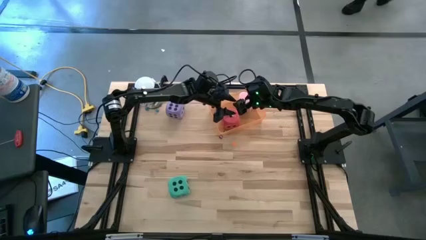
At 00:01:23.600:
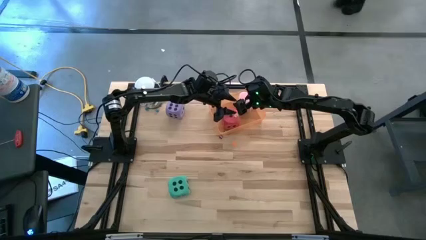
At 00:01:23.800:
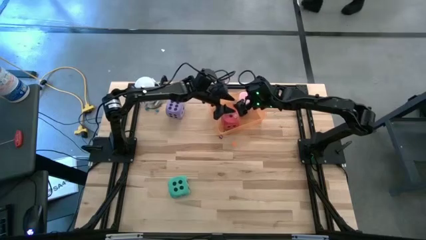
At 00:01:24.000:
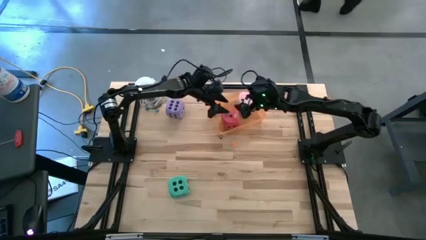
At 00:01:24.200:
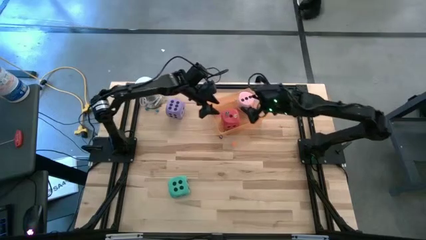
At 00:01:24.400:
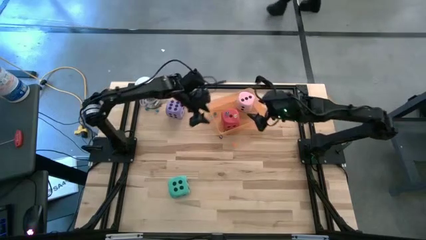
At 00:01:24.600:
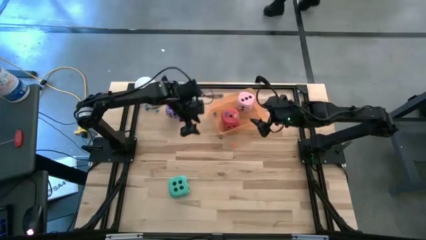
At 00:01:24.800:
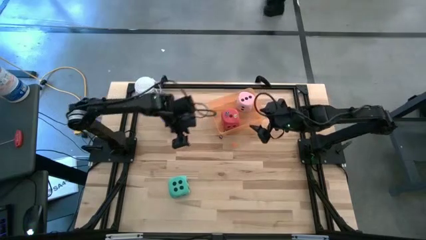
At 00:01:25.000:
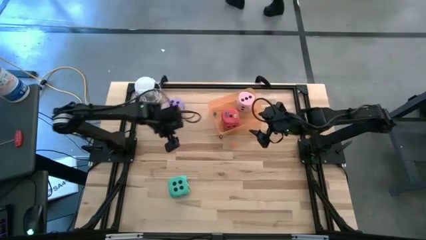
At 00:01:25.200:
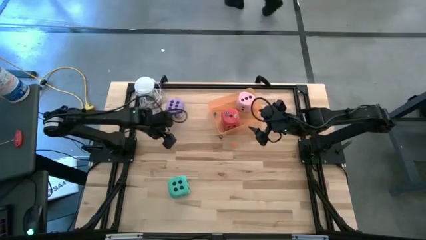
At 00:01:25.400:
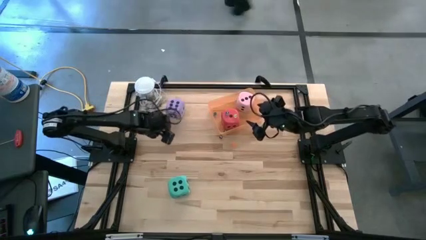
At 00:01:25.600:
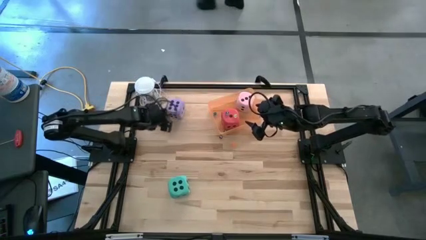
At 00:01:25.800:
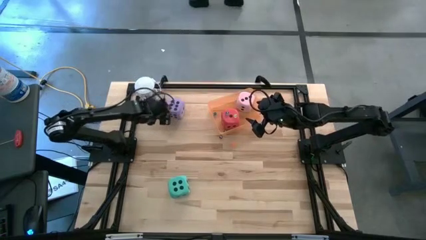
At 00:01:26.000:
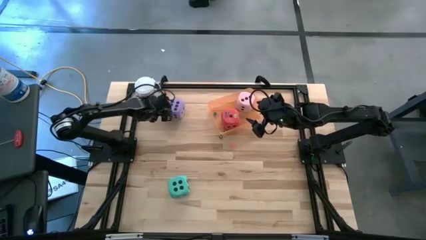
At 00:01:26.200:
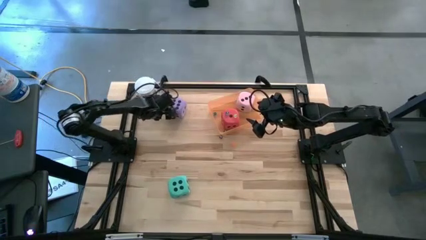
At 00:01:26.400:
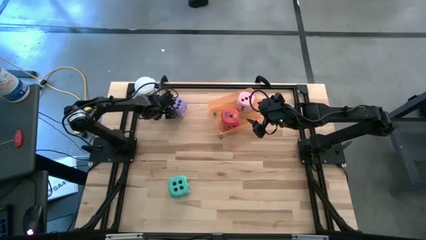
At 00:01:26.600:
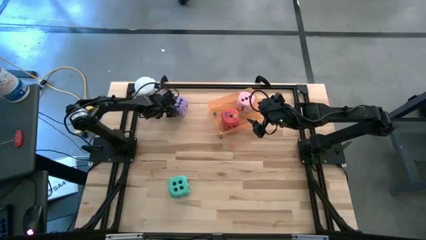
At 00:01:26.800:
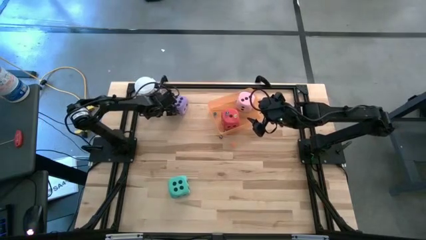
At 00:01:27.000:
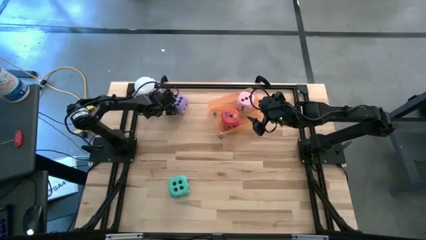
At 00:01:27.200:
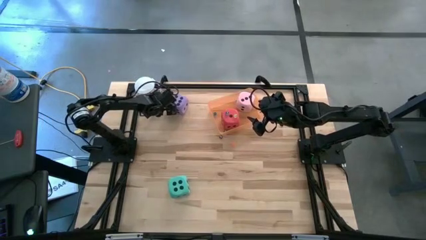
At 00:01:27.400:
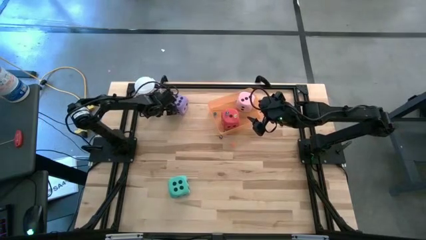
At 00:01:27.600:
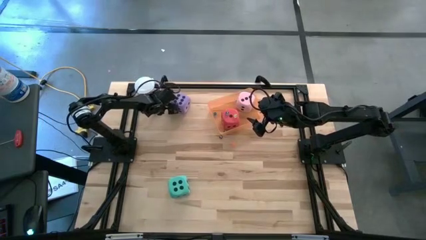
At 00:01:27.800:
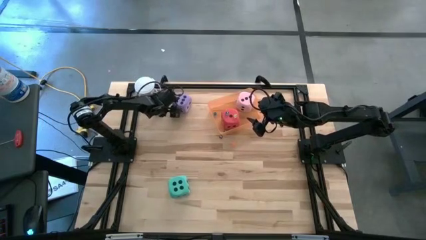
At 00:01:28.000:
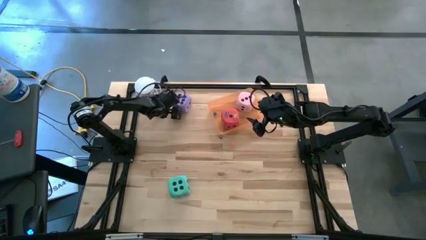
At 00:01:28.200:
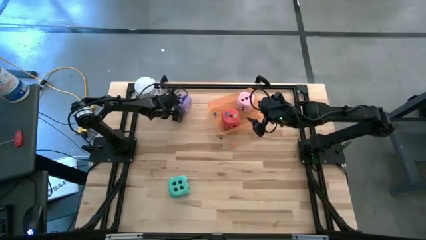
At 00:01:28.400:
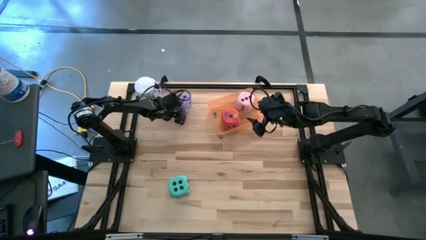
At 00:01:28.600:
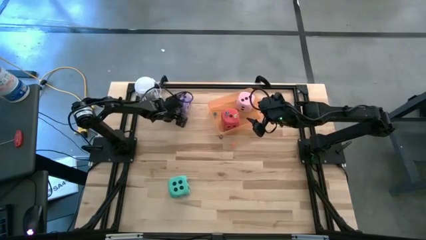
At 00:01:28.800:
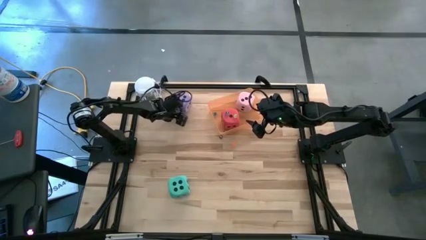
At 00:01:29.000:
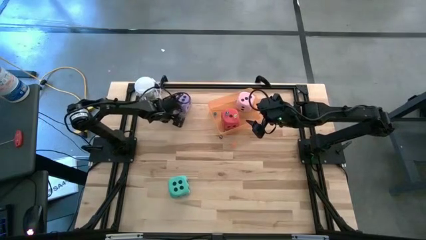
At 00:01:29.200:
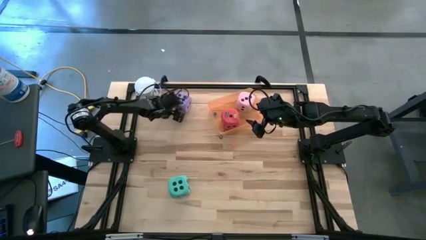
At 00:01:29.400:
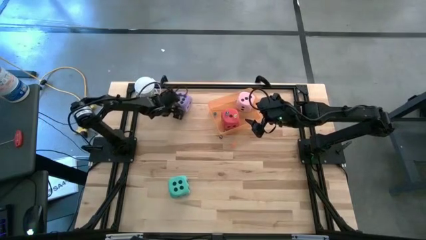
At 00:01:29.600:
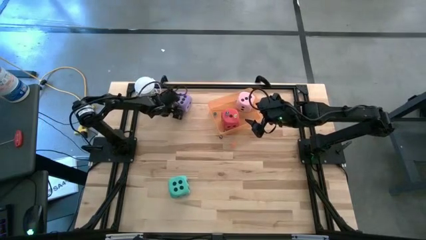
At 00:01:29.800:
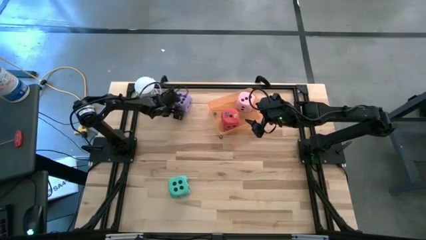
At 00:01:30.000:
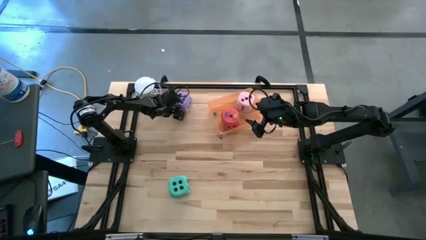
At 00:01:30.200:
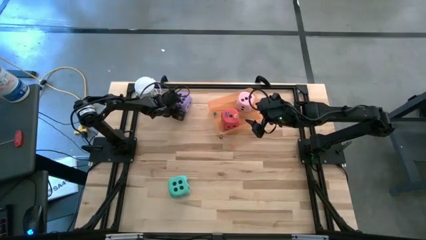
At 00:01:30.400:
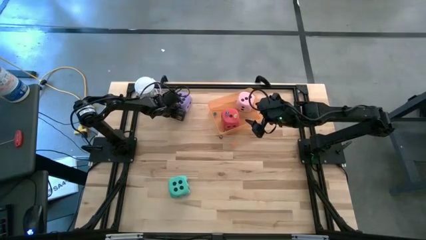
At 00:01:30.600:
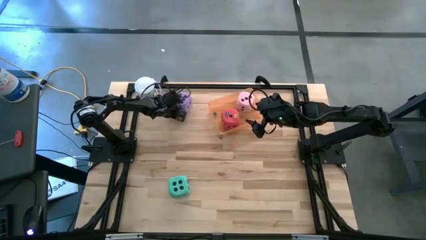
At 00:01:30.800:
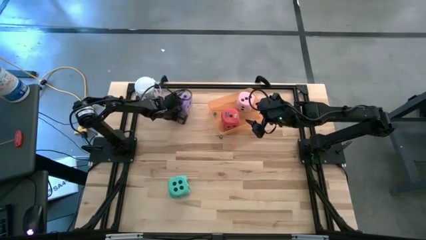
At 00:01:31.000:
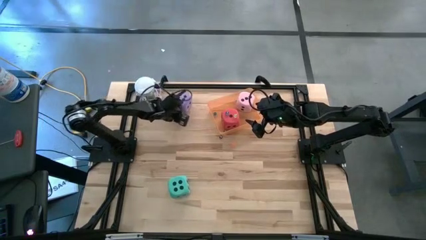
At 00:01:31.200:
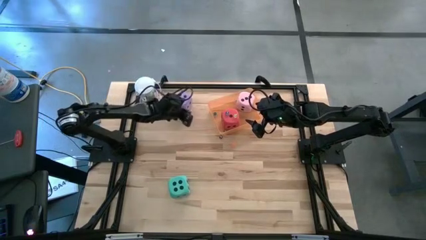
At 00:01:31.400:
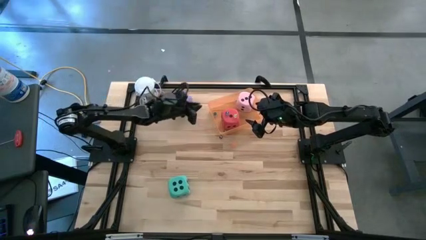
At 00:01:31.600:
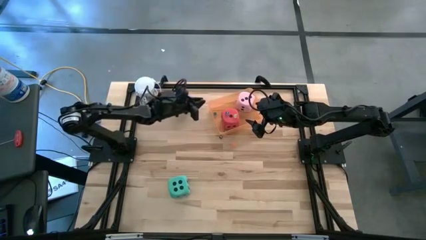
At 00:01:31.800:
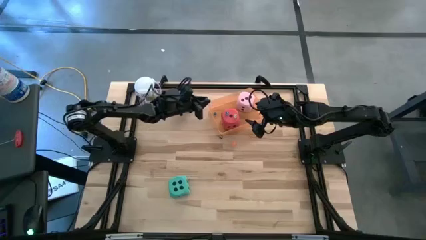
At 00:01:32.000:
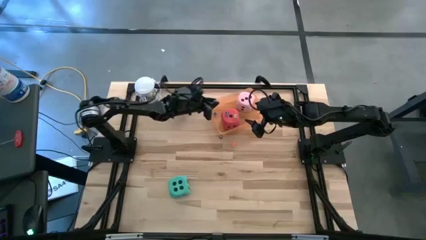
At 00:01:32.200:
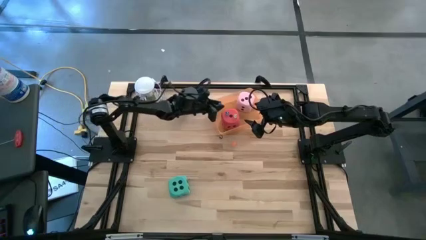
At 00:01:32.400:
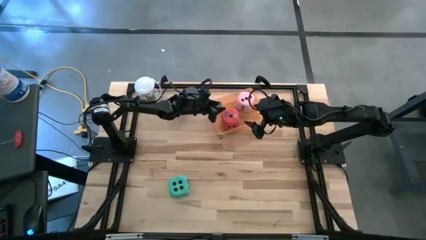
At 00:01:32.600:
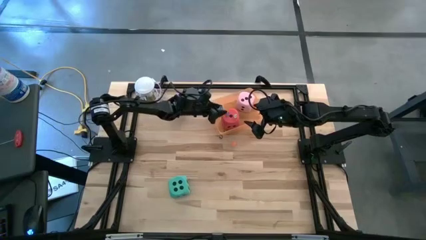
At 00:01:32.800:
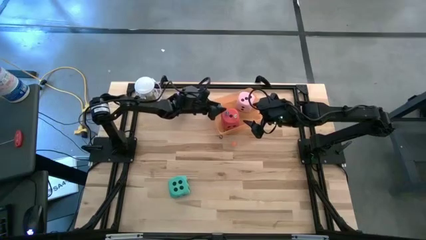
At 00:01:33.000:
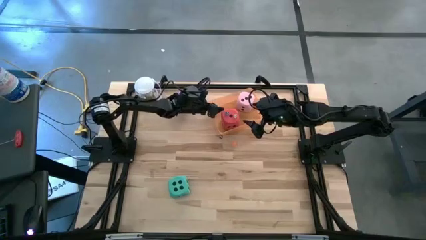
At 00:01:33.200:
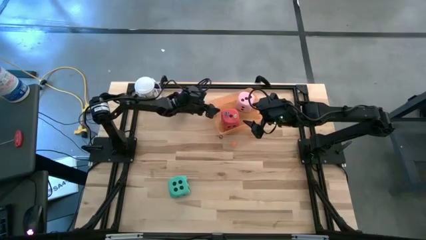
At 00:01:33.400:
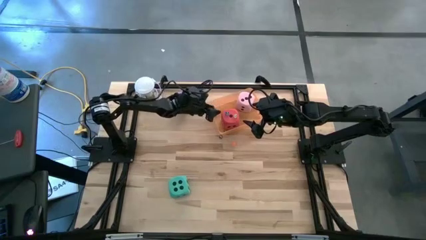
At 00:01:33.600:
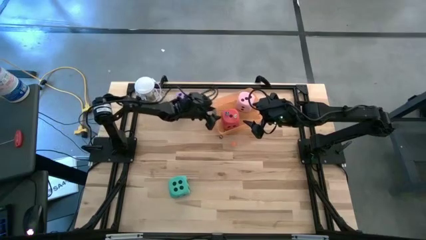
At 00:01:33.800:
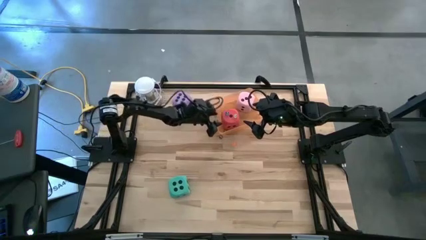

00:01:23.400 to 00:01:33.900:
Task: Pick & Place Dice
Put the right small blue dice into the orange bin
